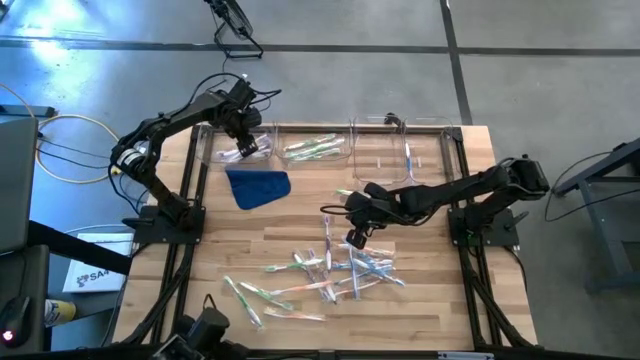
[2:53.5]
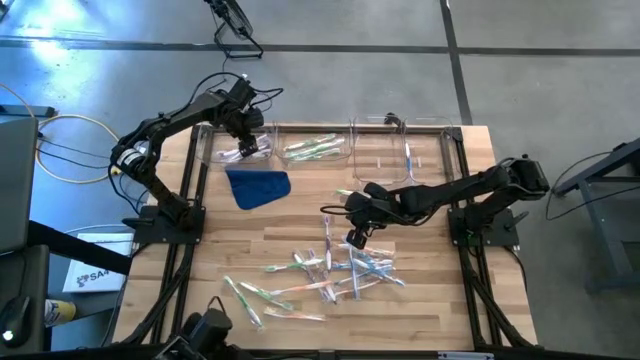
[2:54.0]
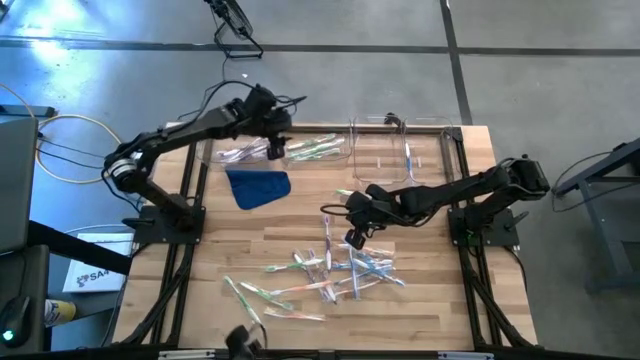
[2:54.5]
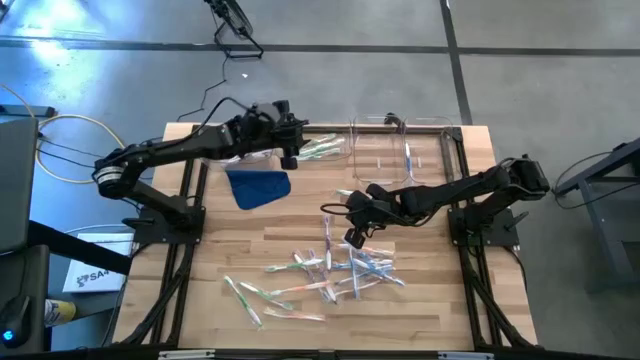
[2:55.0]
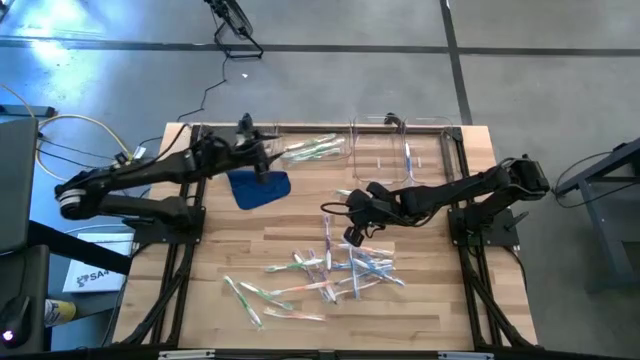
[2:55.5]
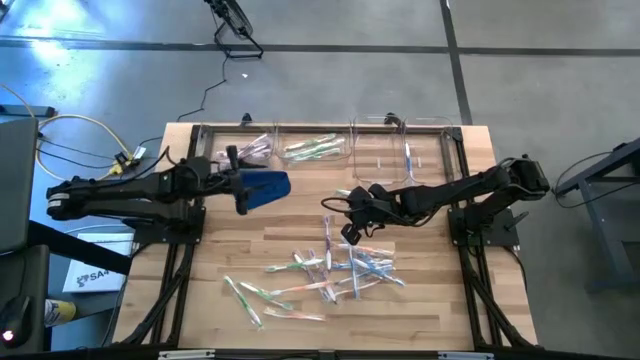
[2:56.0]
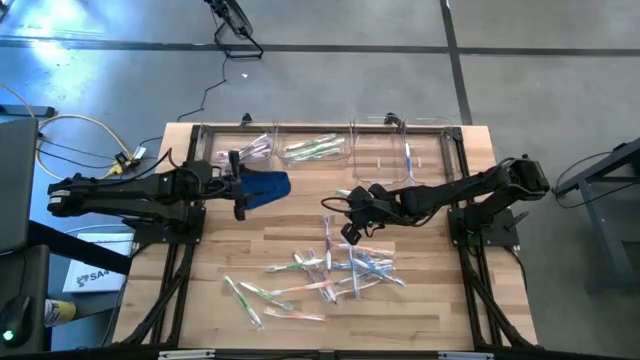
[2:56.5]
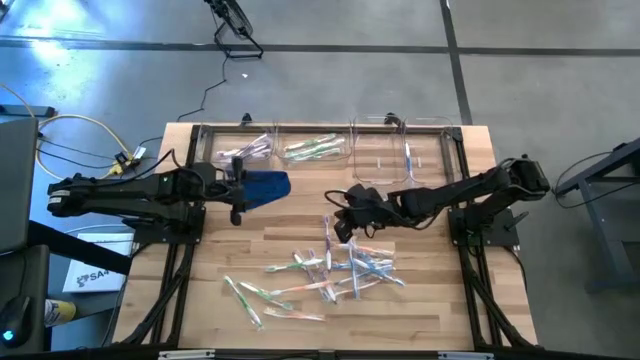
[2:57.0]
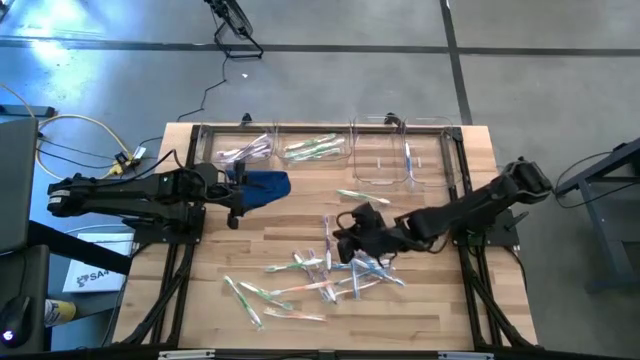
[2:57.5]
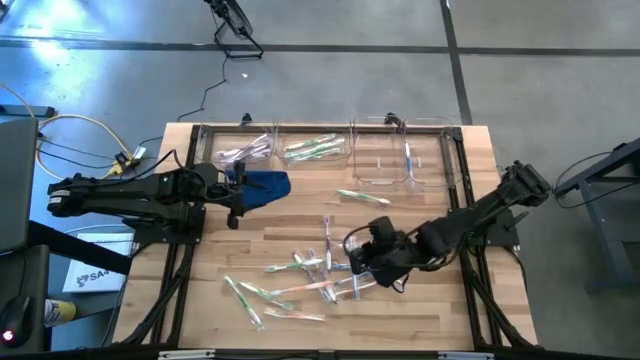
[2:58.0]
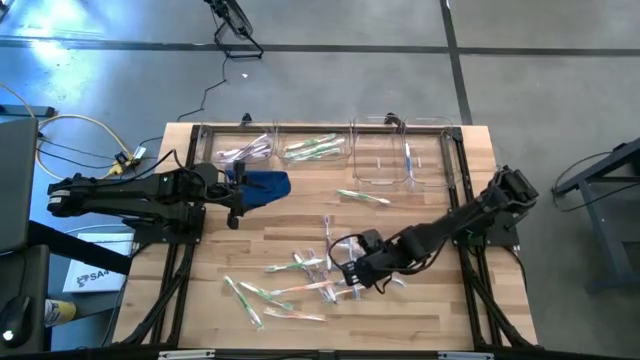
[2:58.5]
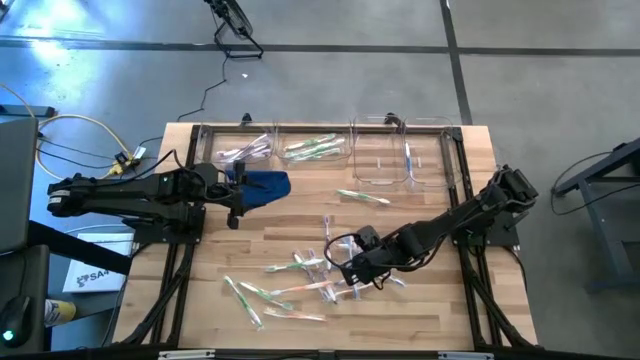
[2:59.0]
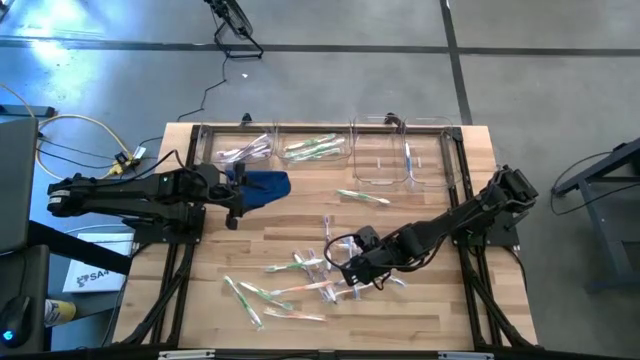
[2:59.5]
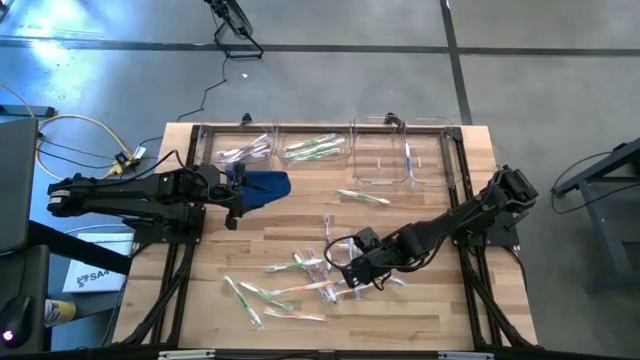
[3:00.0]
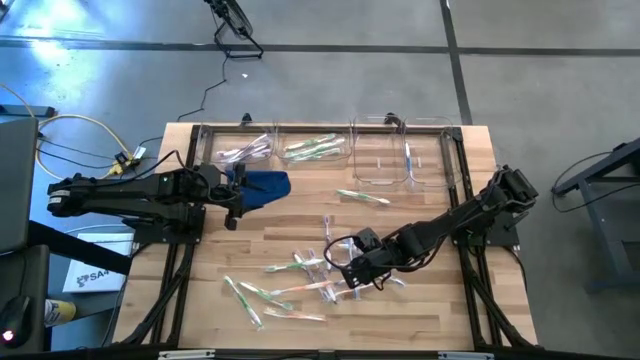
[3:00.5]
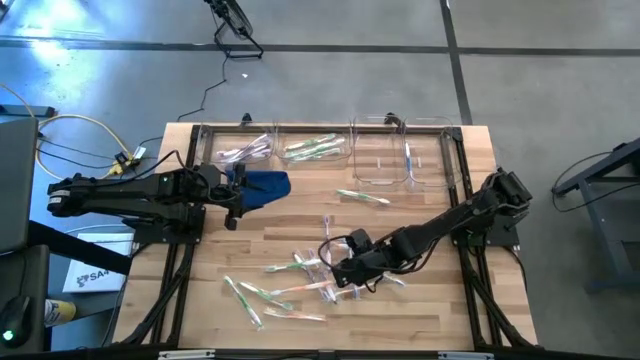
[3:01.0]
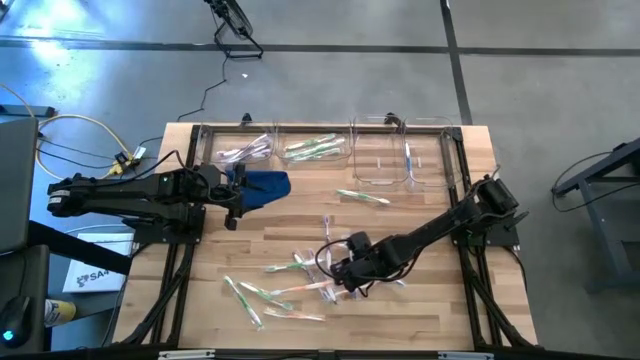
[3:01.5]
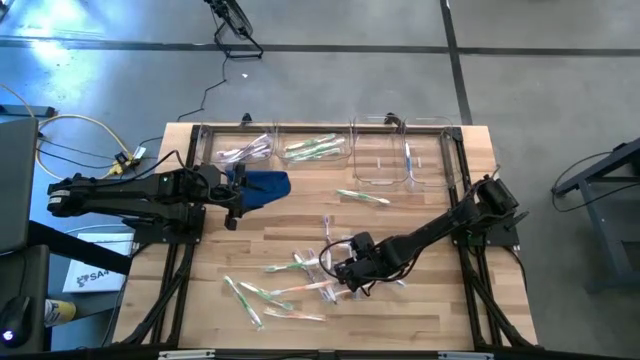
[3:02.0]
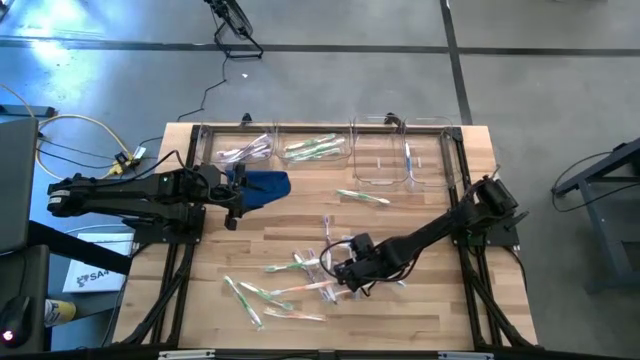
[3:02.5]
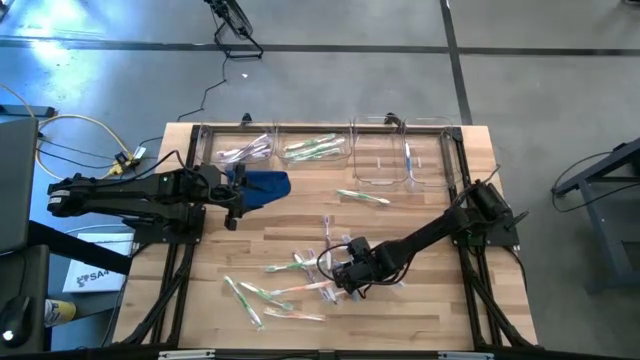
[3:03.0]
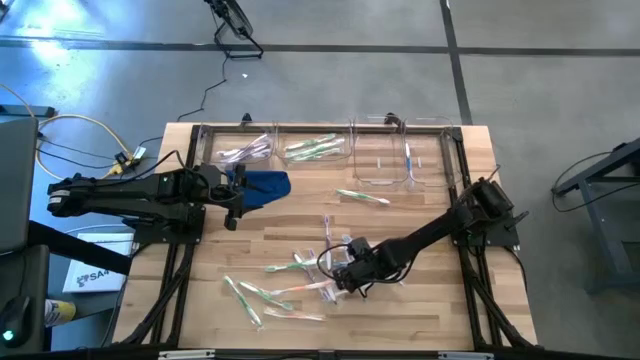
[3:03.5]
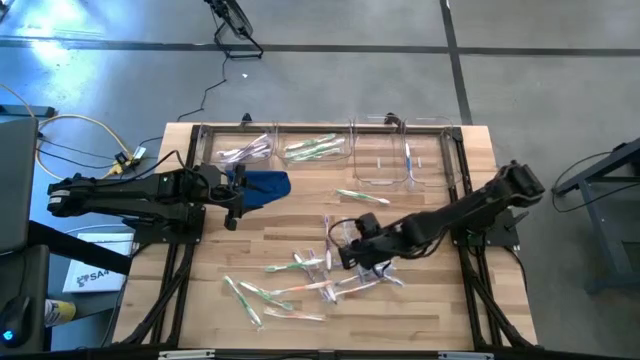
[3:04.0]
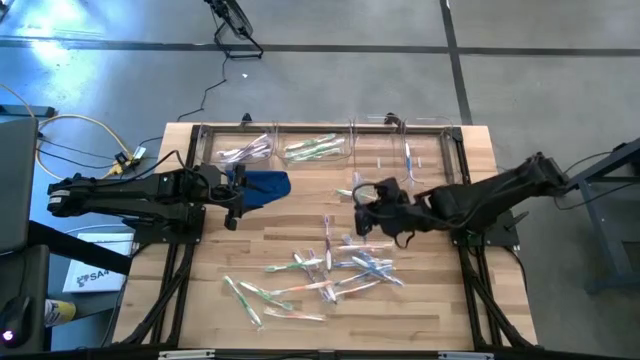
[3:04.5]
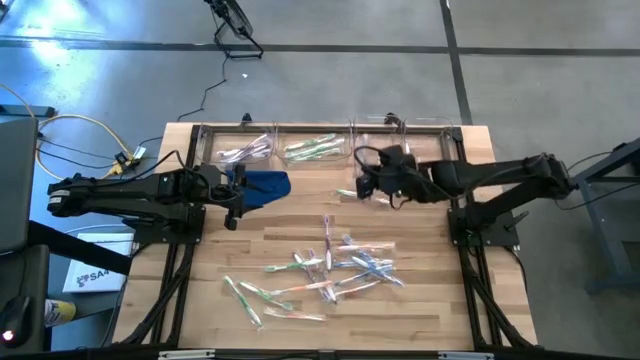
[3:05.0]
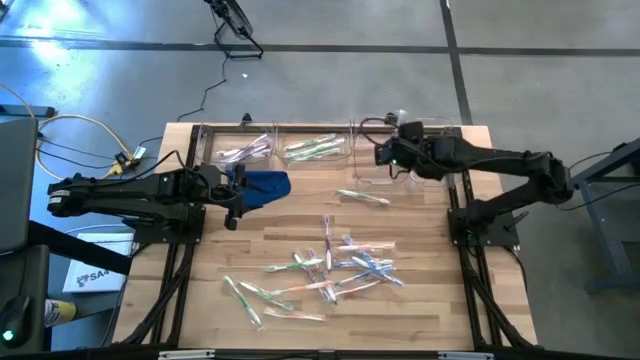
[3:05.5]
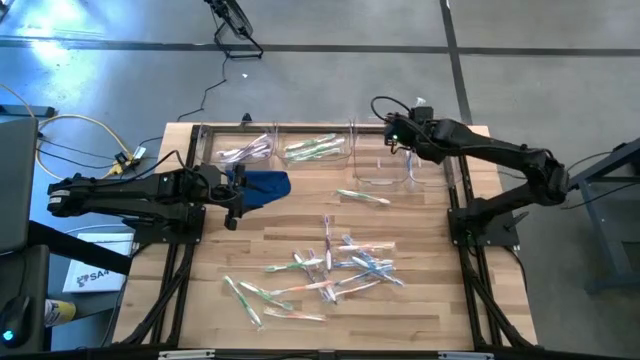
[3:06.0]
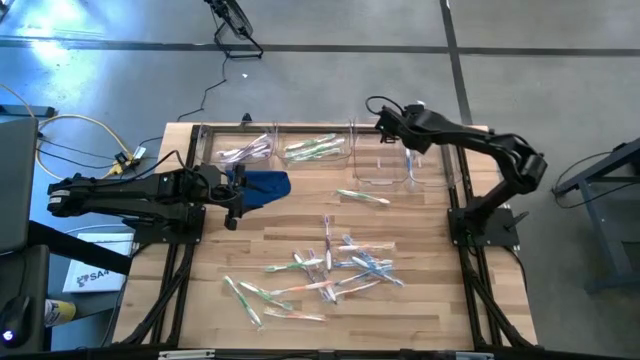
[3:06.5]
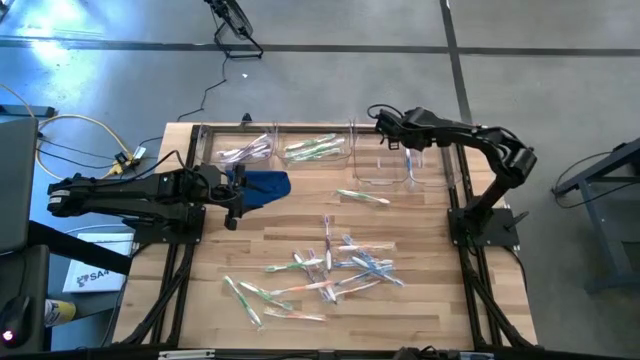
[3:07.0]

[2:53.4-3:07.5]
Task: Pick & Place Toothbrushes
Put the blue toothbrush into the right transparent bin

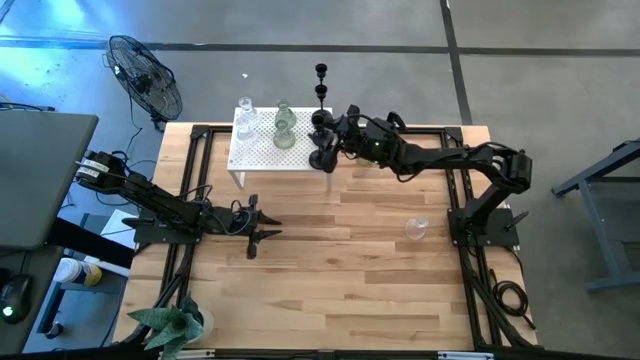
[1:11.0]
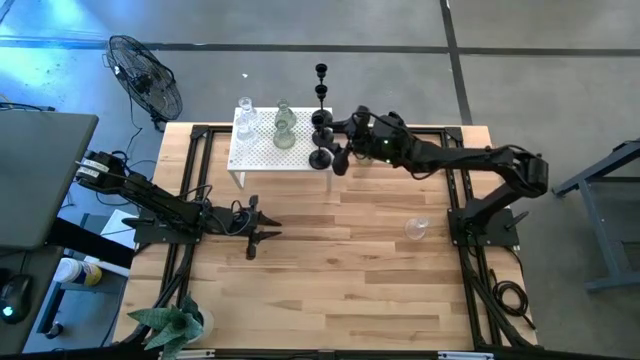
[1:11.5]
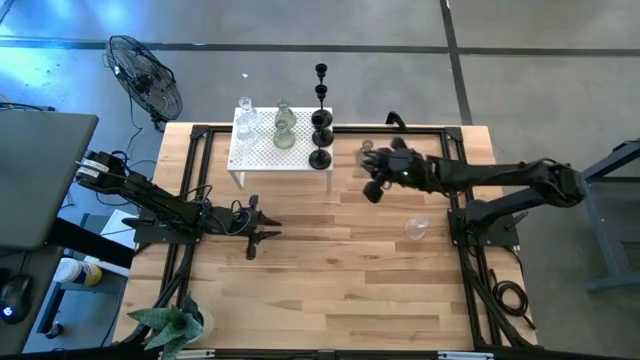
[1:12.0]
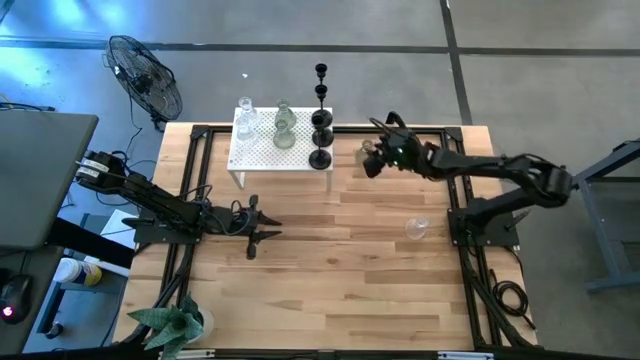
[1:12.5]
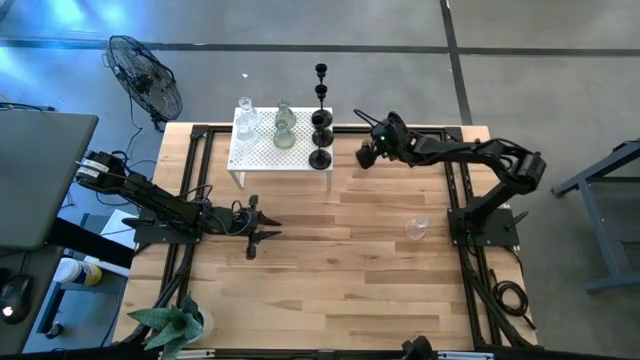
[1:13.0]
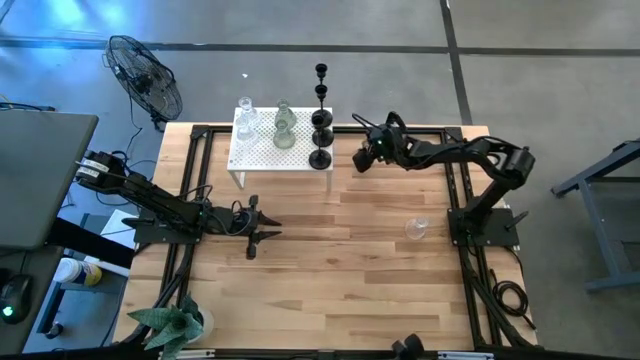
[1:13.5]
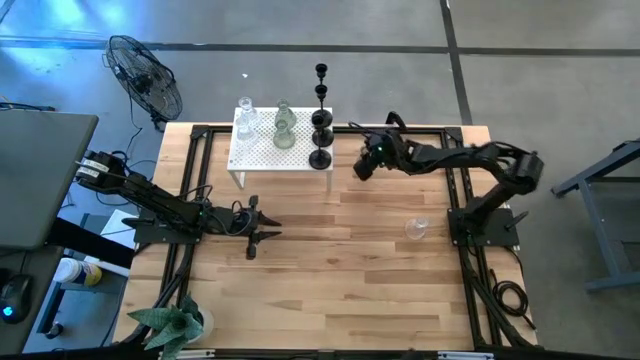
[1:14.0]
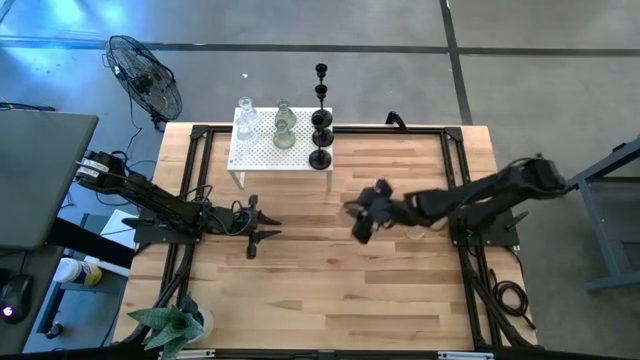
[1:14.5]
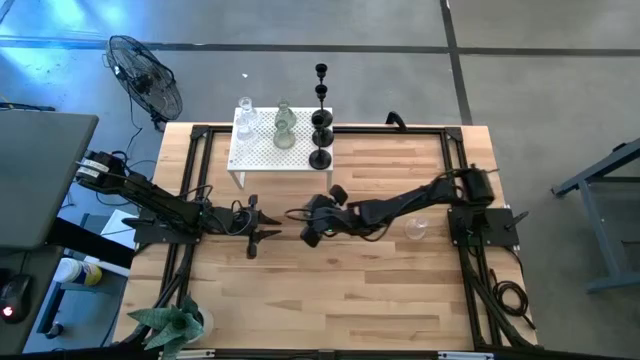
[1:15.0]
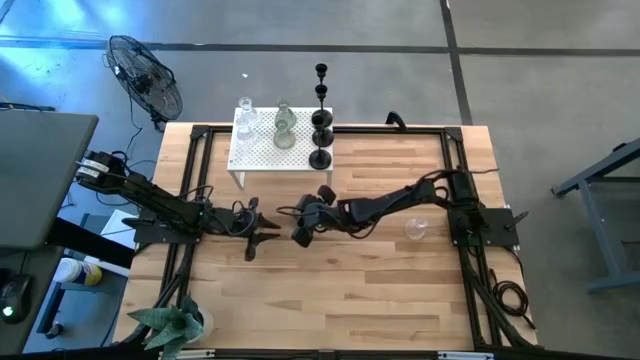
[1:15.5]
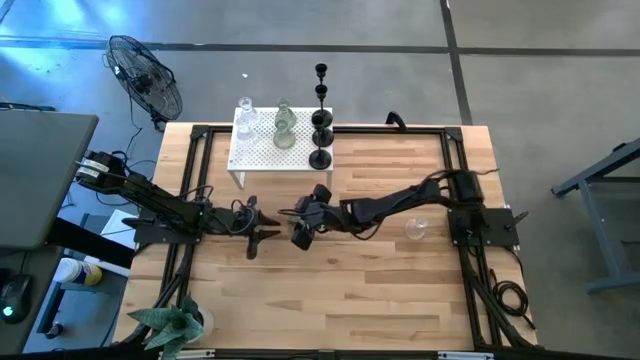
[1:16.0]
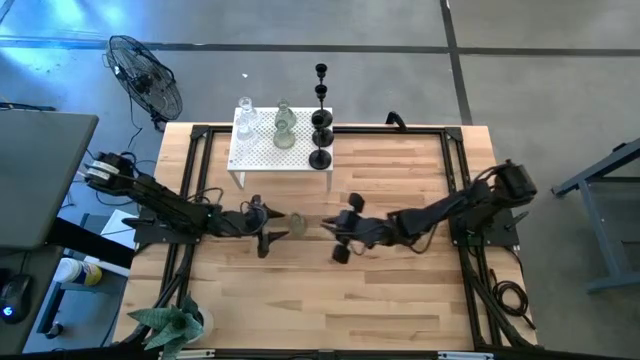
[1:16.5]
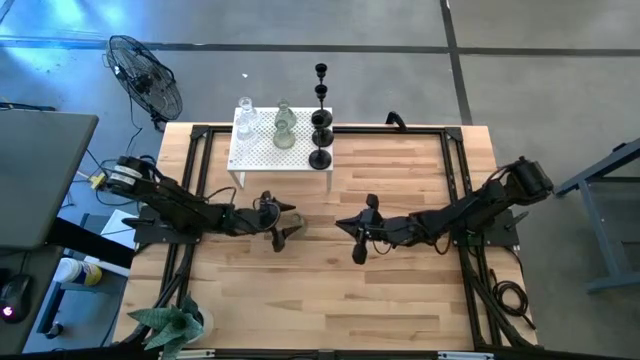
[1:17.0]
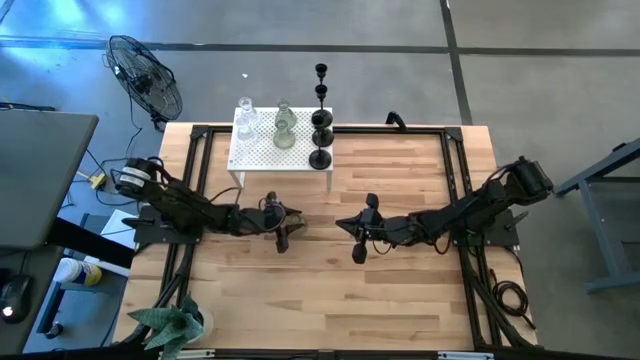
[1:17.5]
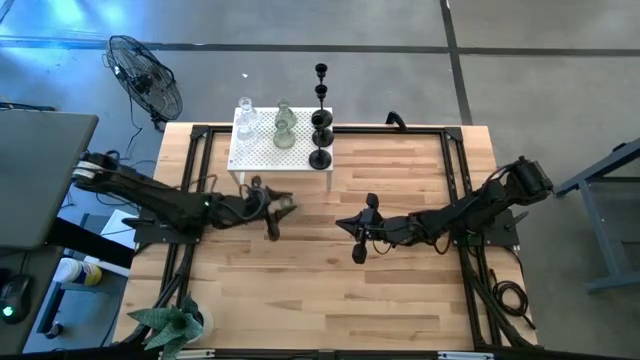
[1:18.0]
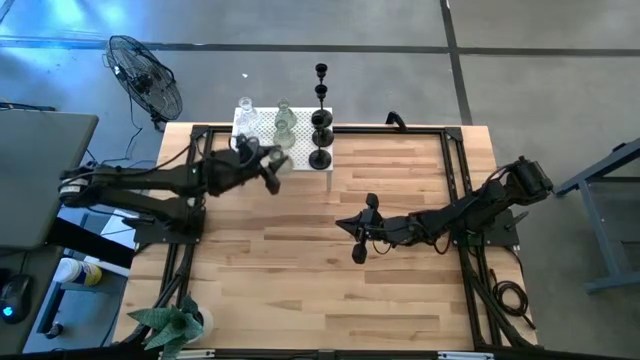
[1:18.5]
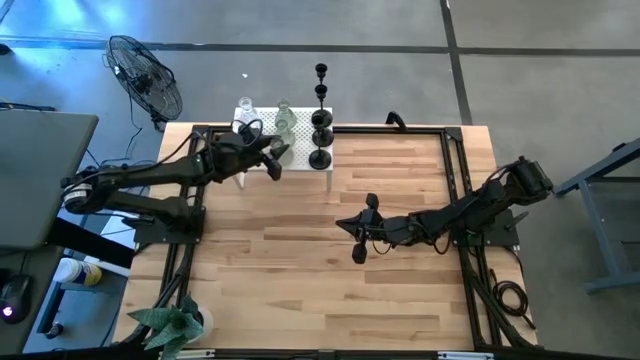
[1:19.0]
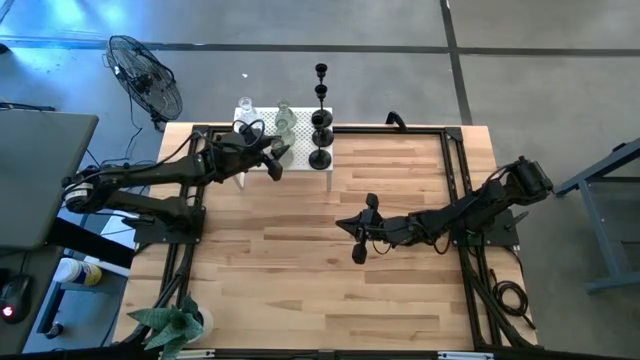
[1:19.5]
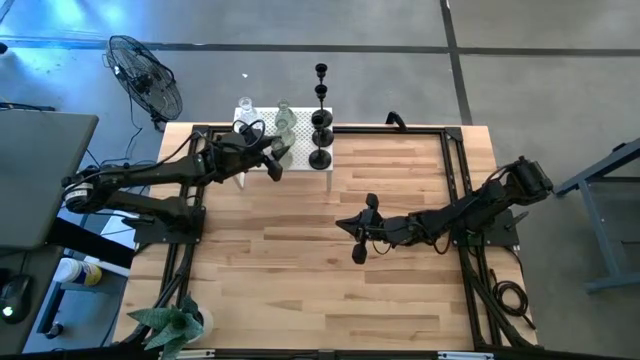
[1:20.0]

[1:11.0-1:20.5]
Task: Pick & Place candle stick holders
Align the green candle holder with the other green candle holder on the shelf
